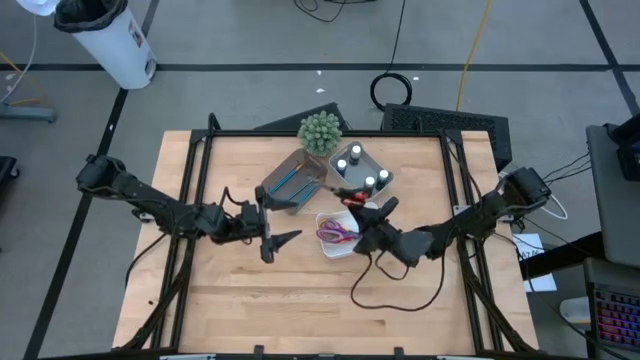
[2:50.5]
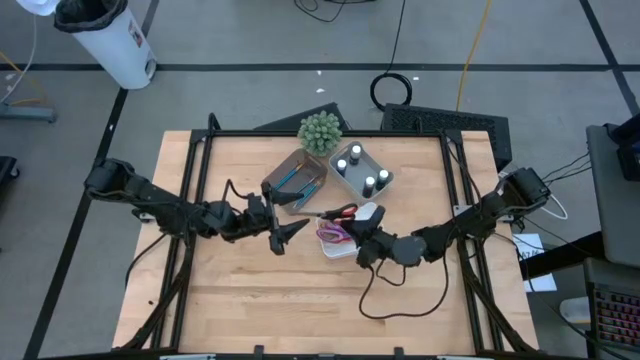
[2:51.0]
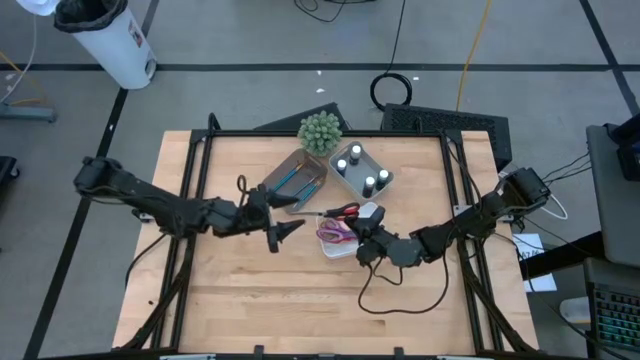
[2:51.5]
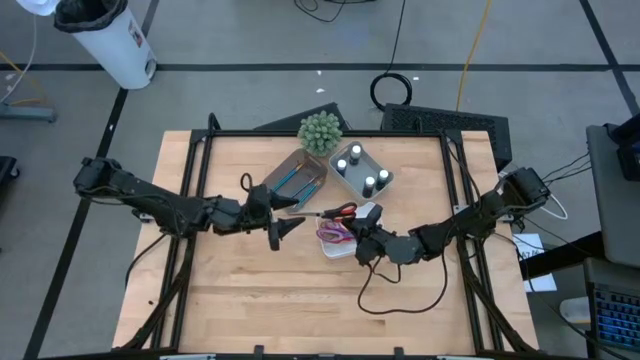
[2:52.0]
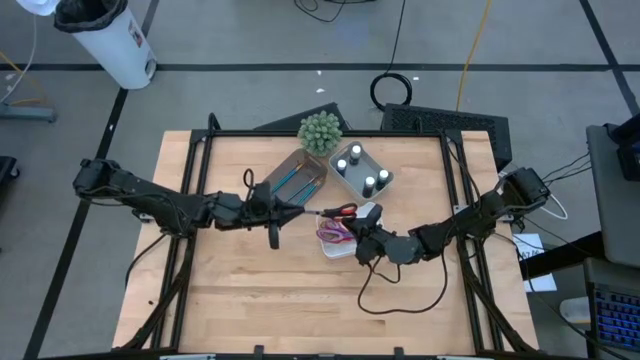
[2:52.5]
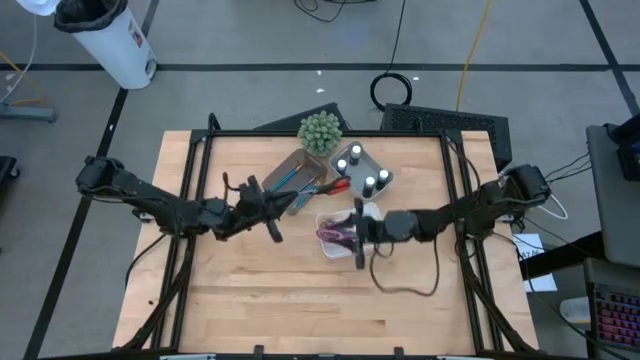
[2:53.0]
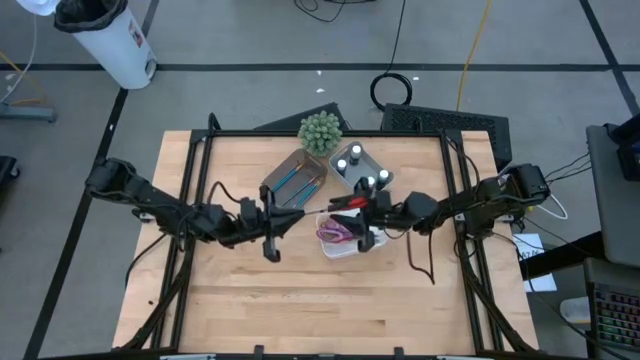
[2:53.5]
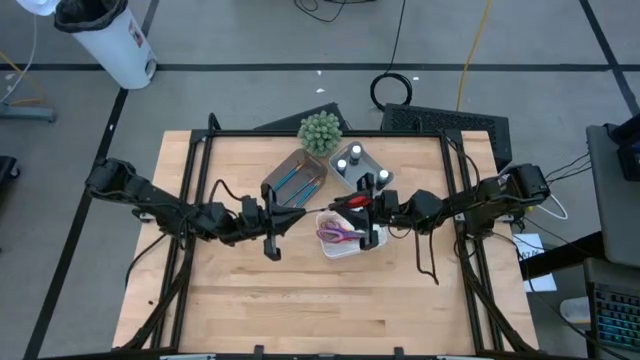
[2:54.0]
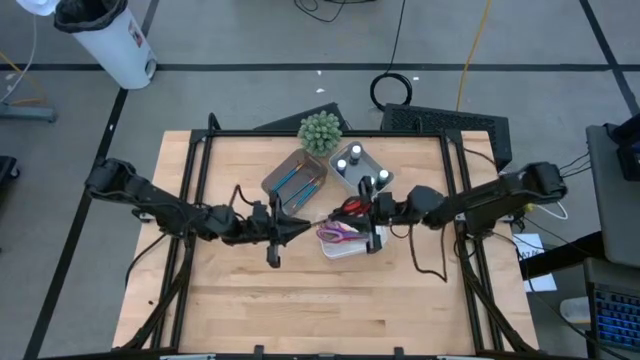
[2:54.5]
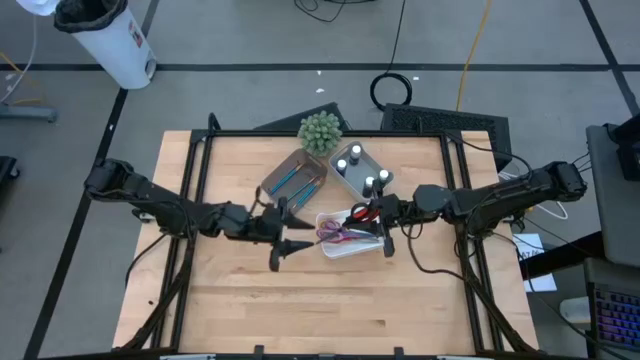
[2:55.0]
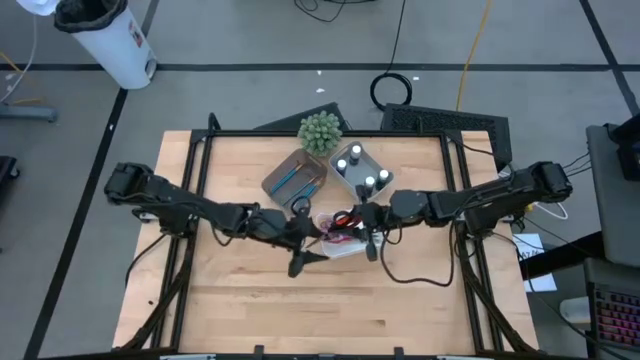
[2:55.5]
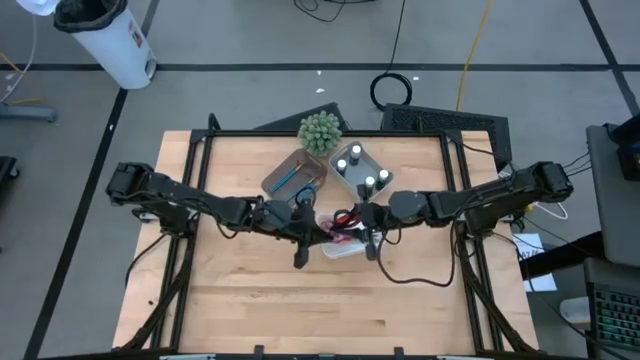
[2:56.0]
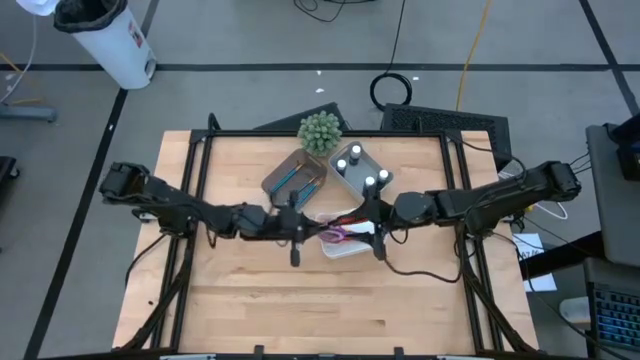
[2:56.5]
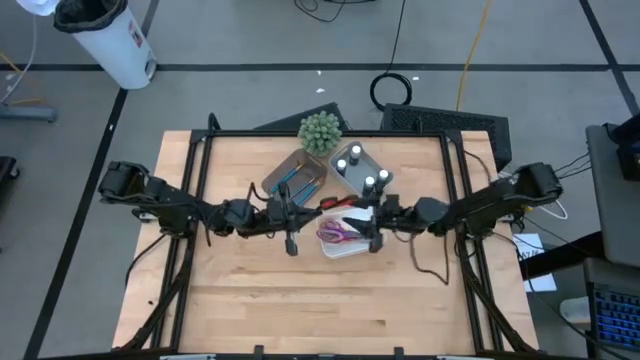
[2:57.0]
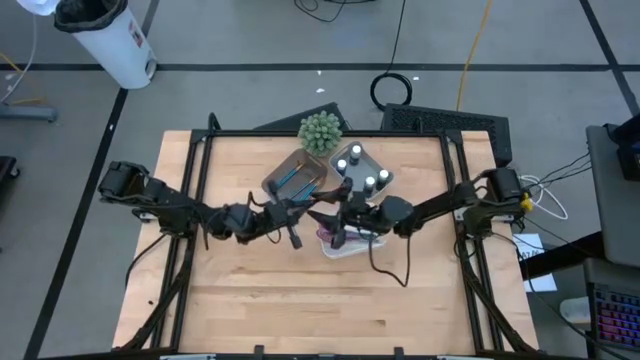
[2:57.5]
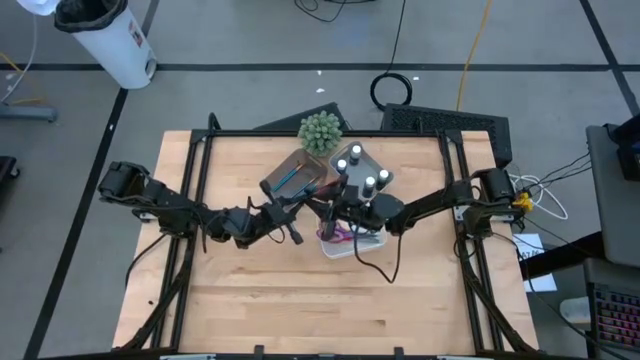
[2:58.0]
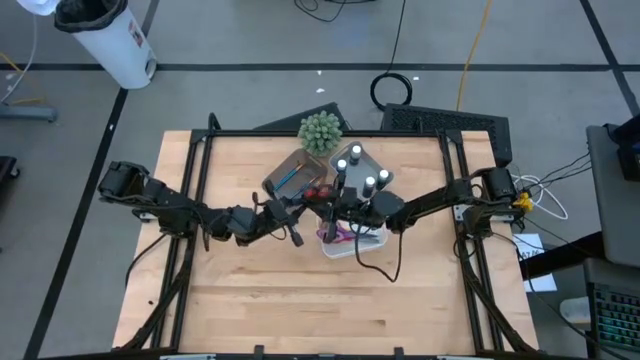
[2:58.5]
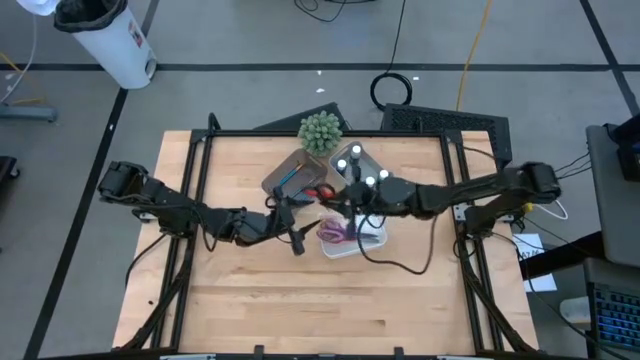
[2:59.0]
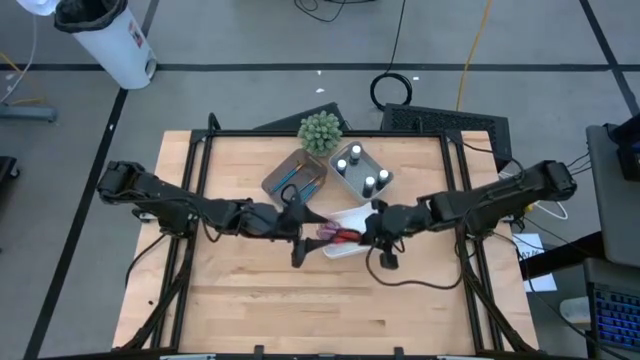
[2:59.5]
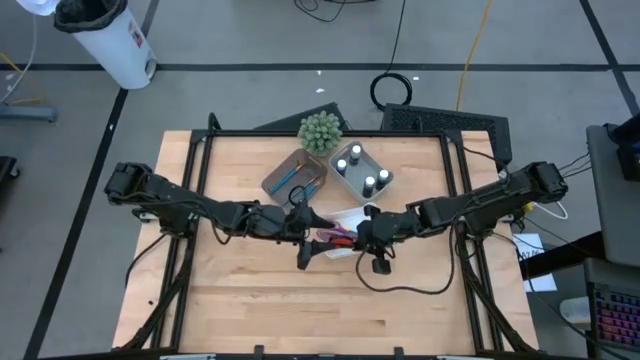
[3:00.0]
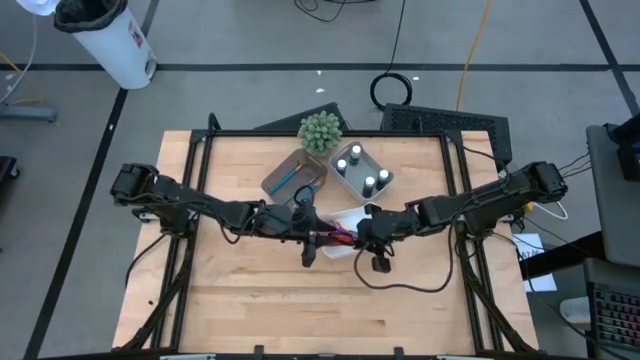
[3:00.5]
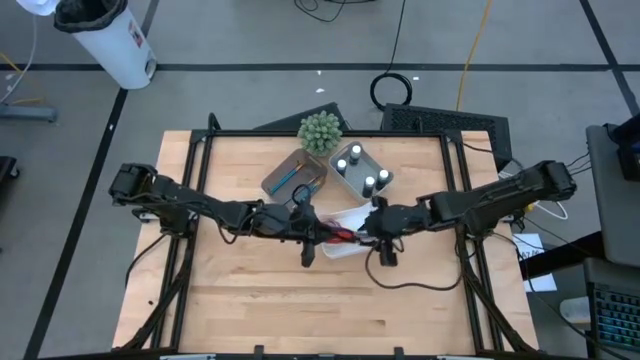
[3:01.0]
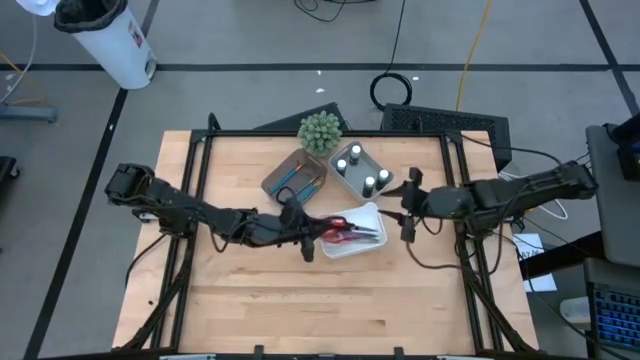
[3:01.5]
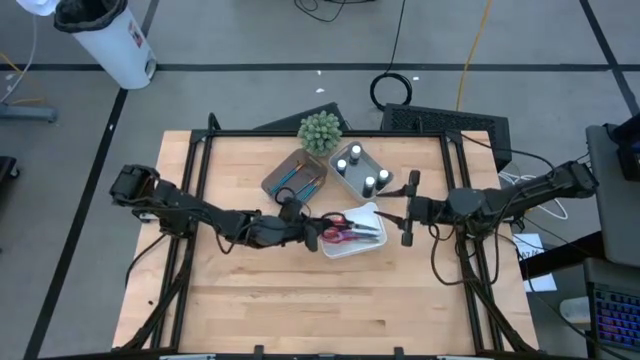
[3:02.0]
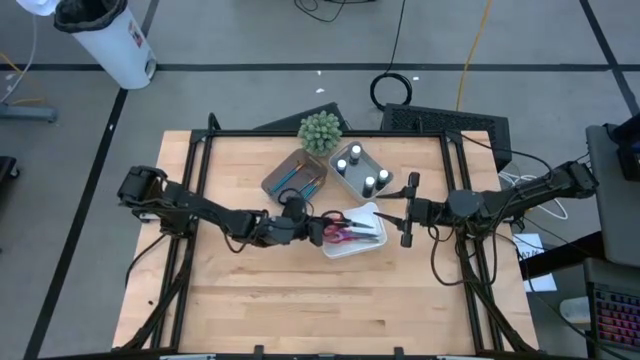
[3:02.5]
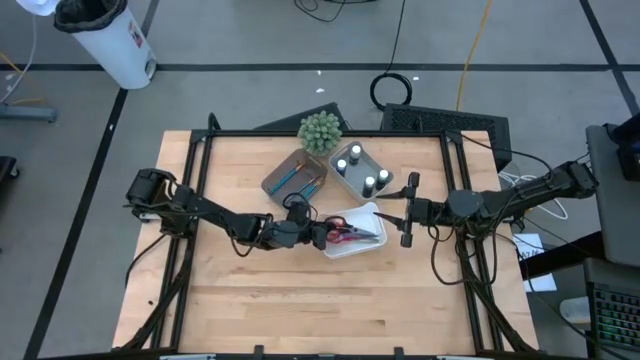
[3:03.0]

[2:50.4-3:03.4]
Task: Pick & Place Paint Supplies
Put the black scissors into the white bin

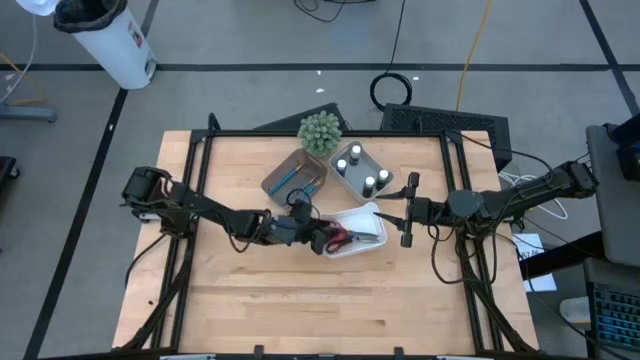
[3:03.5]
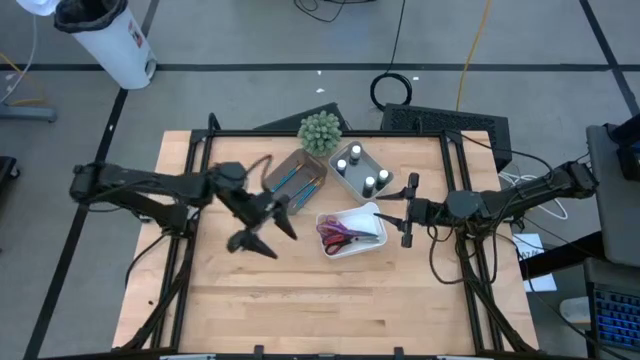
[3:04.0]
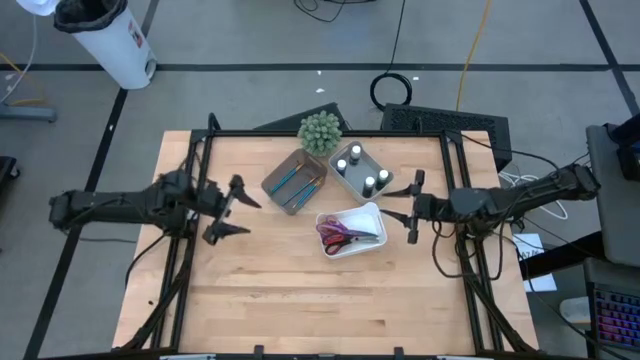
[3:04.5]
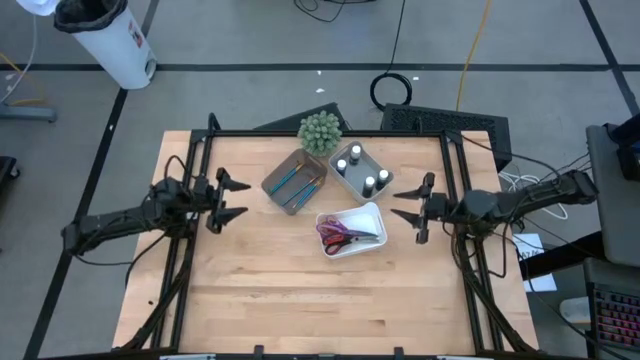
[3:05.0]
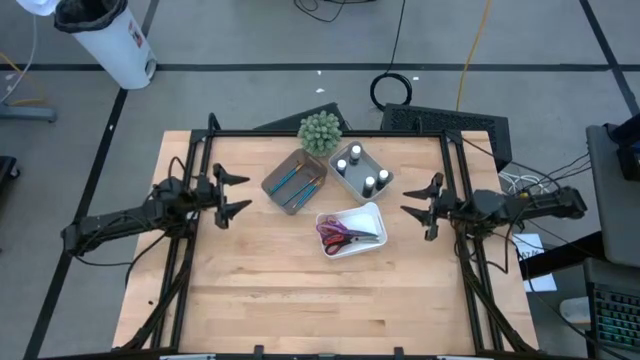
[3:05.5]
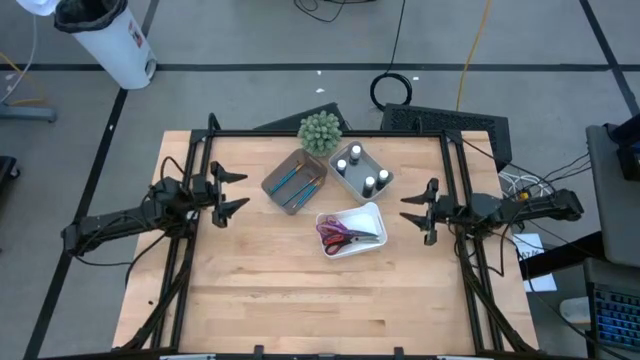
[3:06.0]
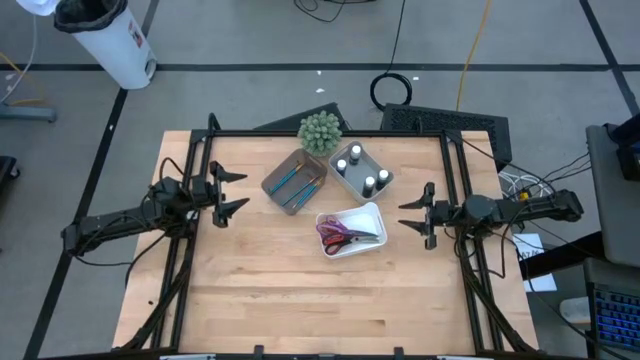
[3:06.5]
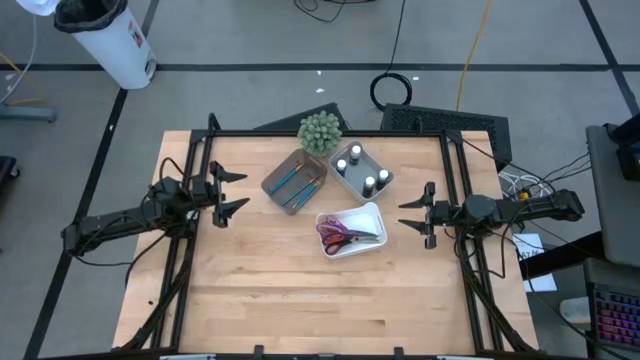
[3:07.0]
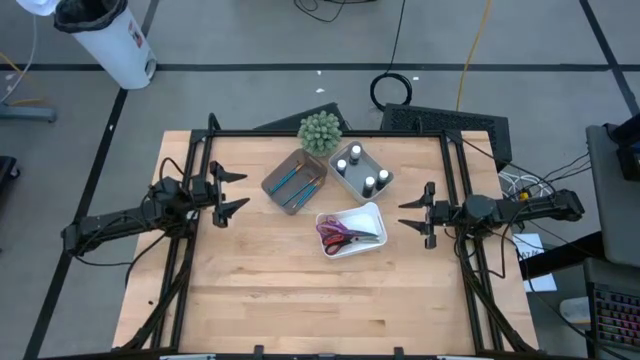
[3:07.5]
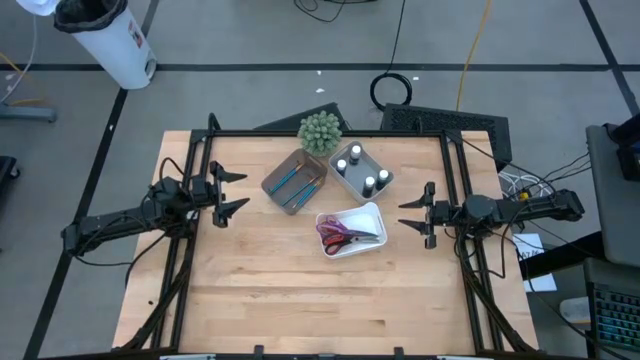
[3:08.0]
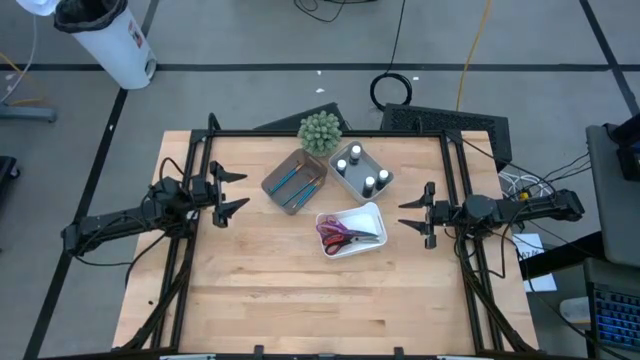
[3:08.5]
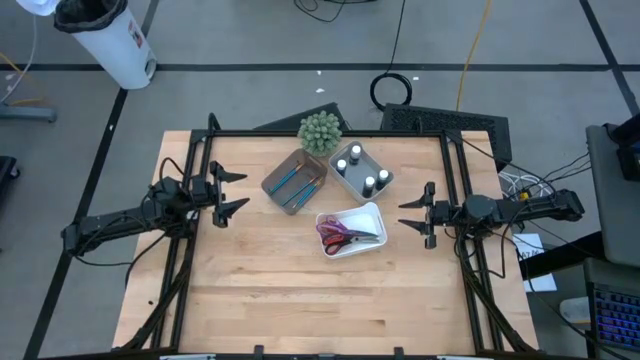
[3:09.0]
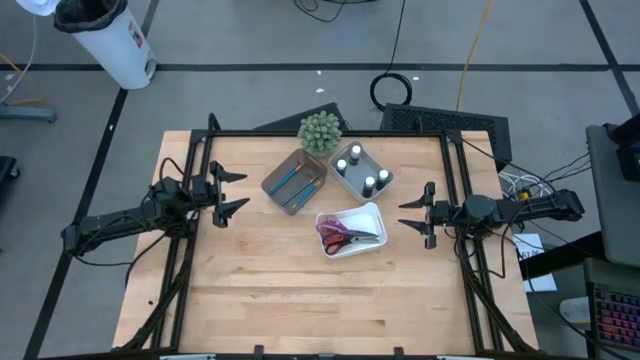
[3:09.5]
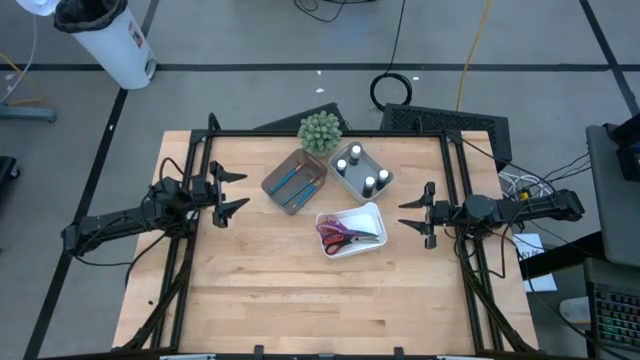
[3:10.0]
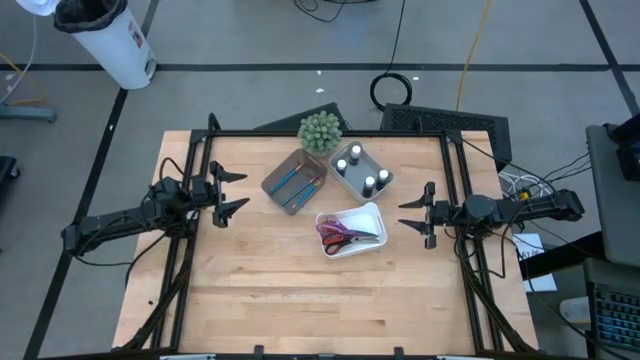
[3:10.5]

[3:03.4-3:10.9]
Return to Home Position

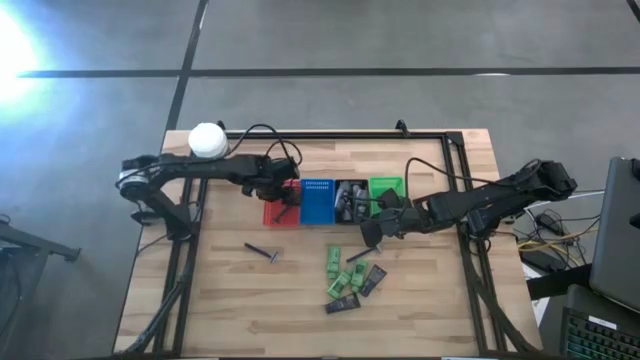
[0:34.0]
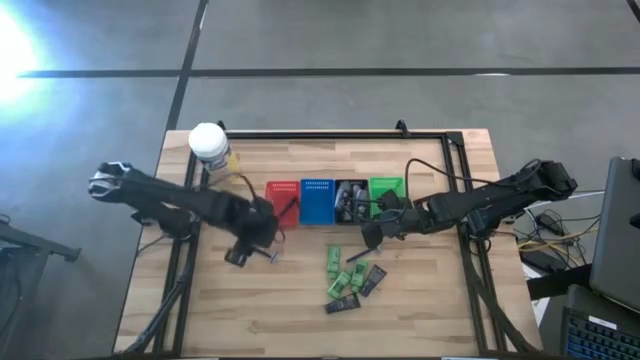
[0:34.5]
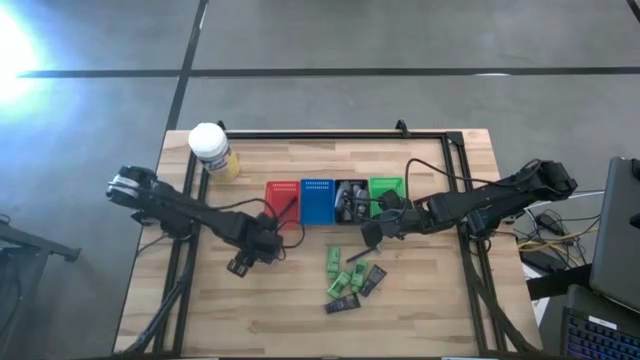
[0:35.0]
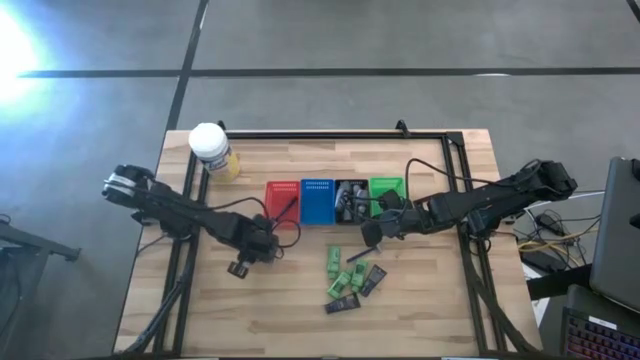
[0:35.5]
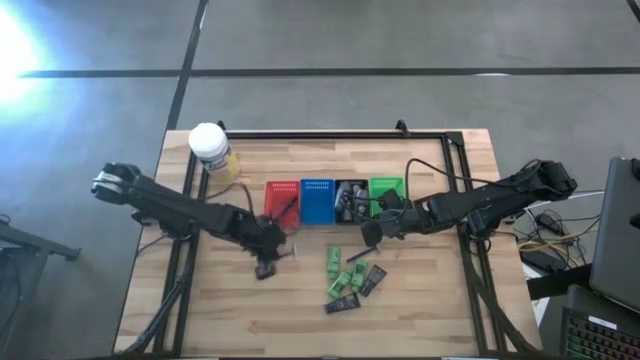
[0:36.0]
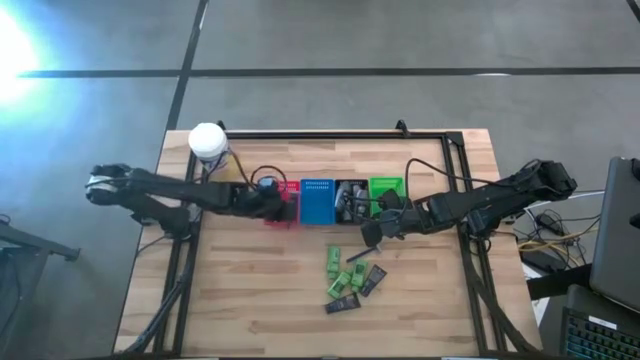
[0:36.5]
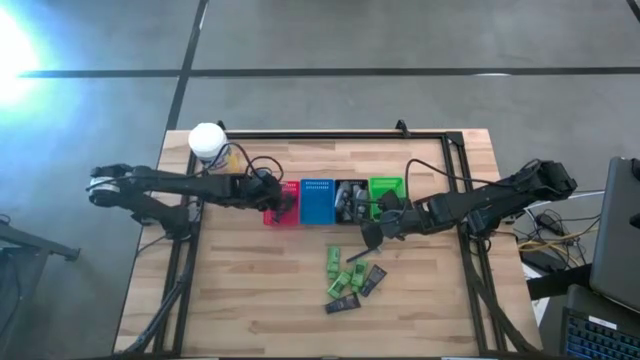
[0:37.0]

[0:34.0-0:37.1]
Task: Pick & Place Travel size toiletries
Put the blue razor into the red bin
